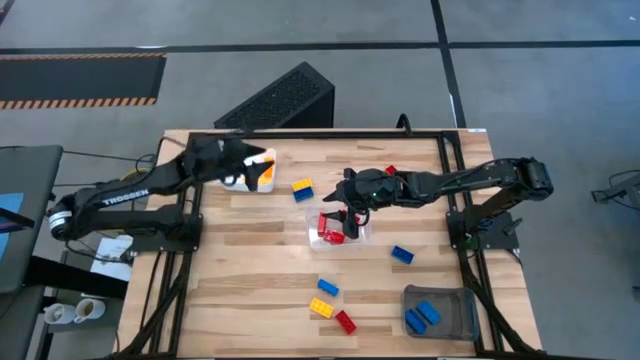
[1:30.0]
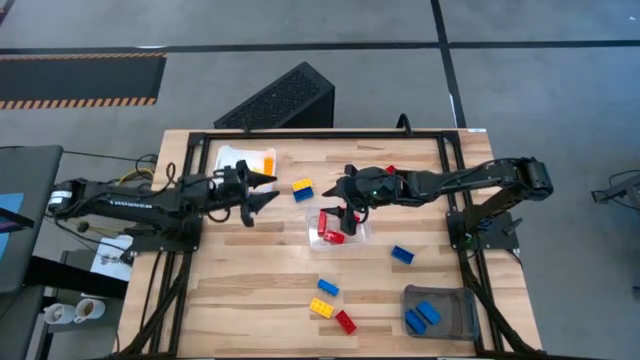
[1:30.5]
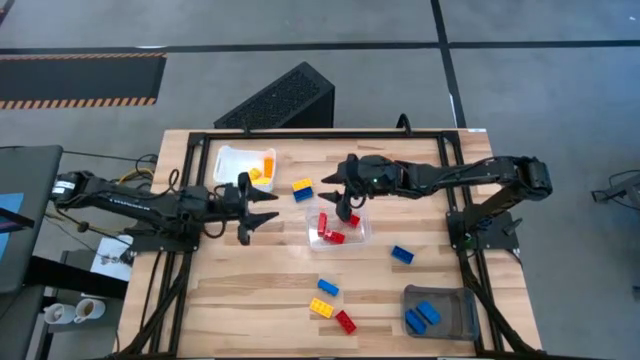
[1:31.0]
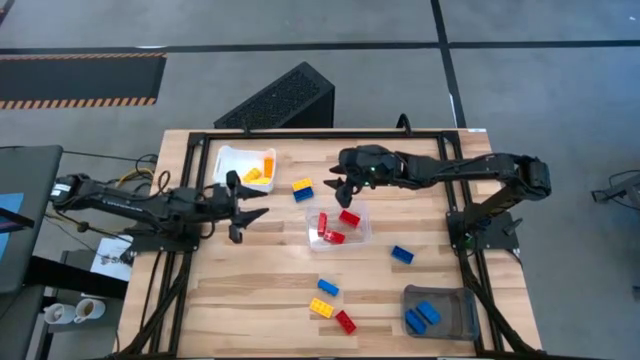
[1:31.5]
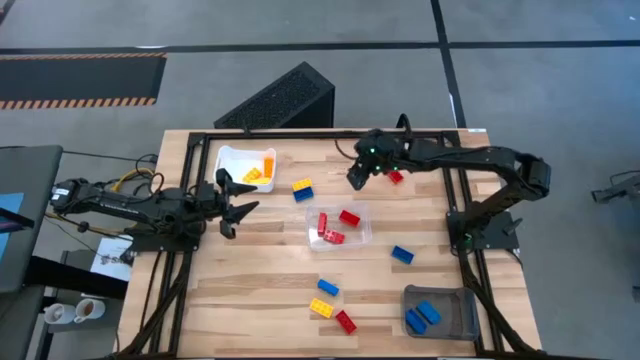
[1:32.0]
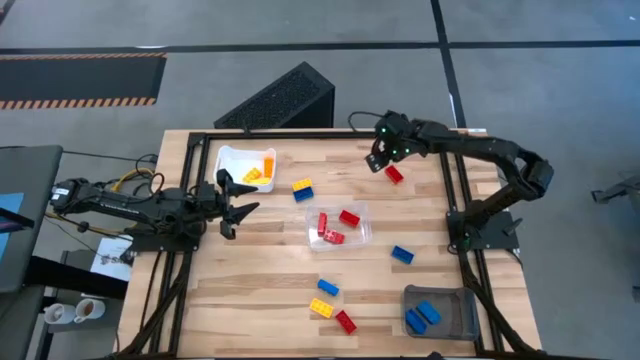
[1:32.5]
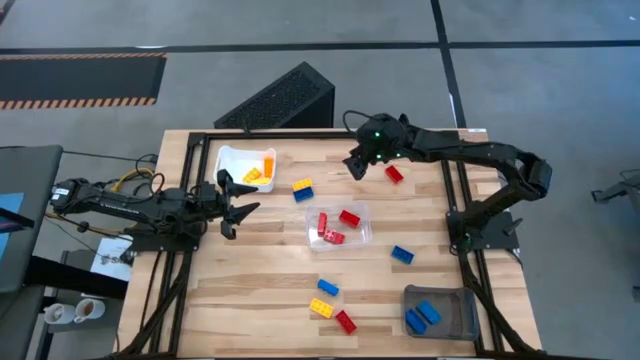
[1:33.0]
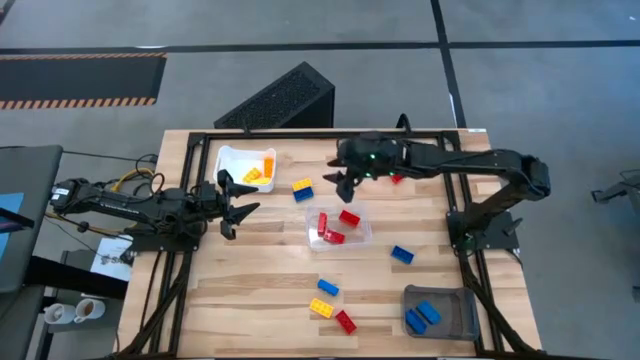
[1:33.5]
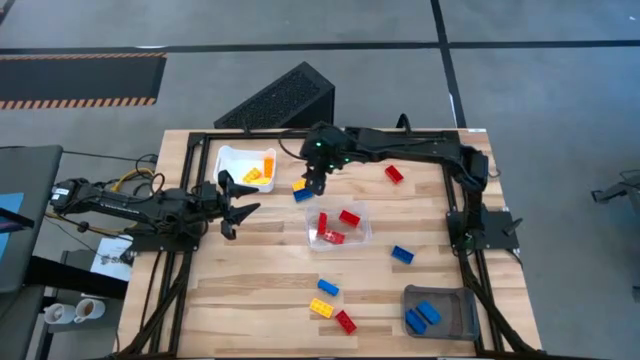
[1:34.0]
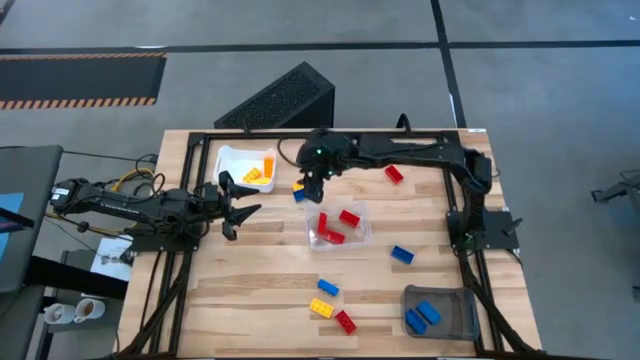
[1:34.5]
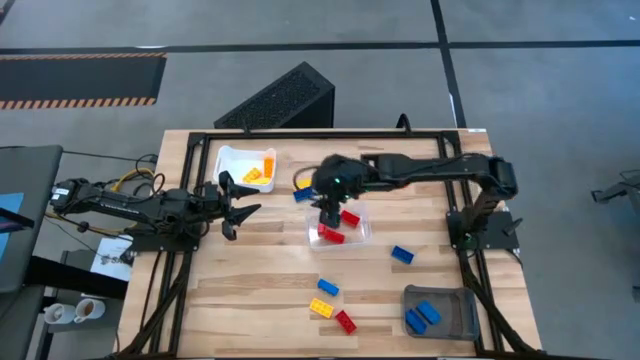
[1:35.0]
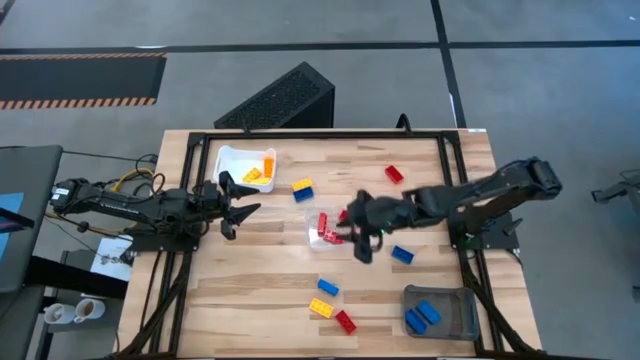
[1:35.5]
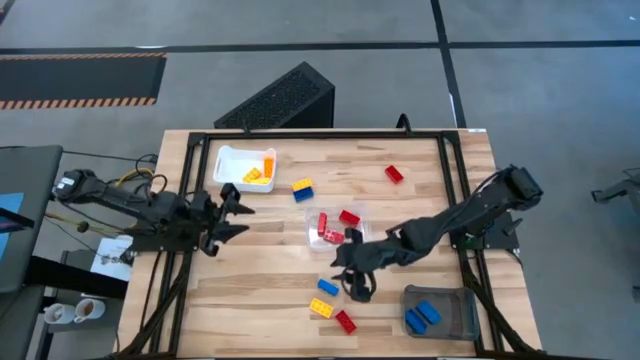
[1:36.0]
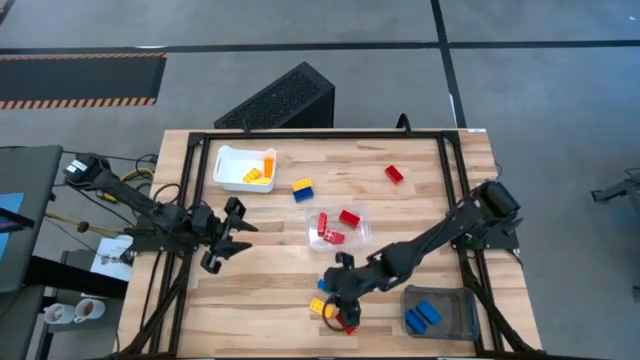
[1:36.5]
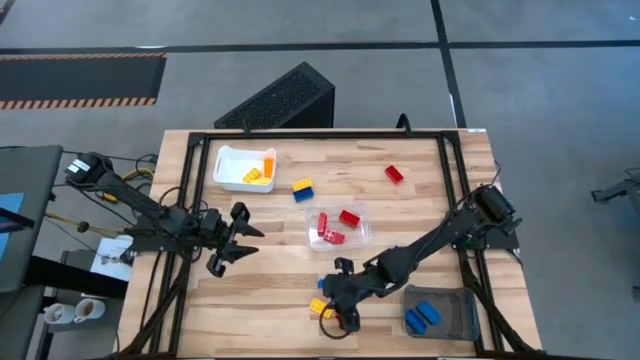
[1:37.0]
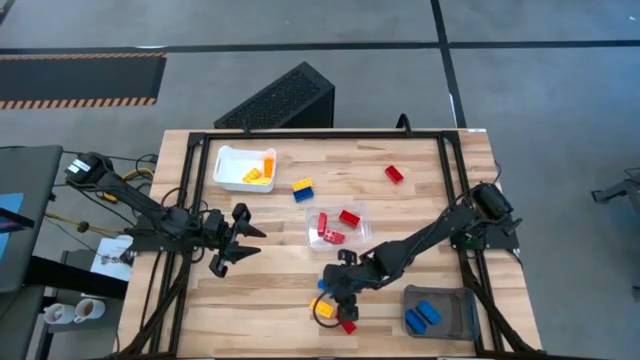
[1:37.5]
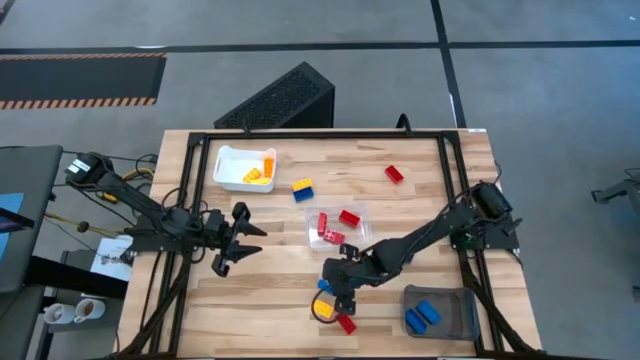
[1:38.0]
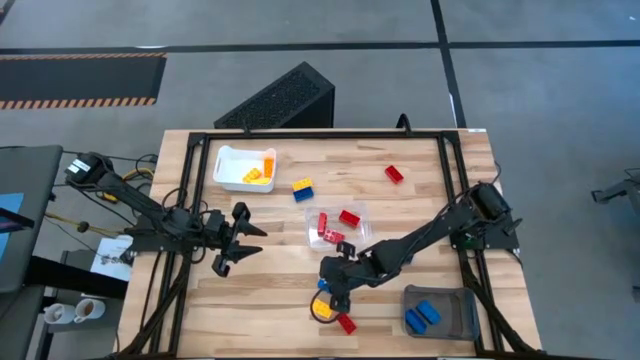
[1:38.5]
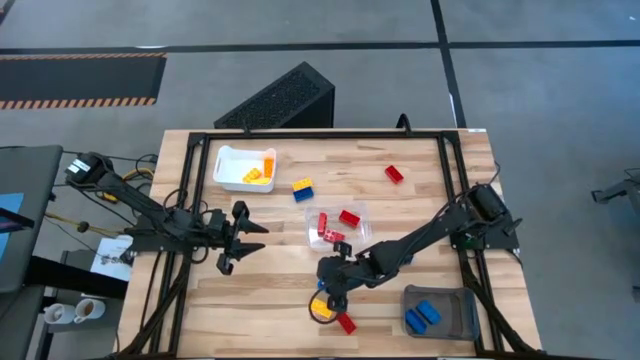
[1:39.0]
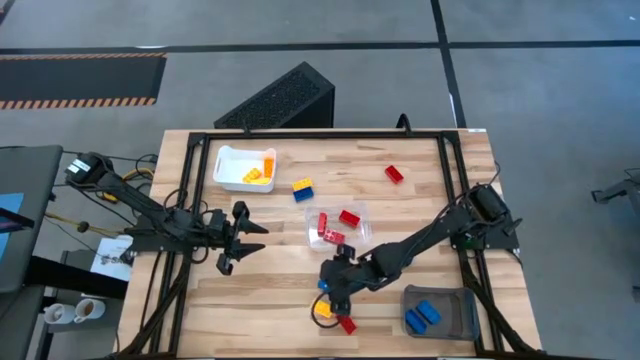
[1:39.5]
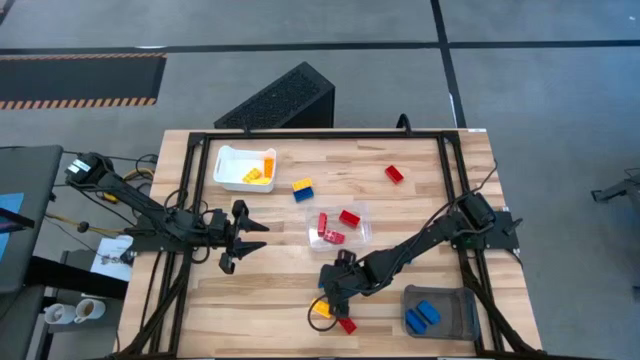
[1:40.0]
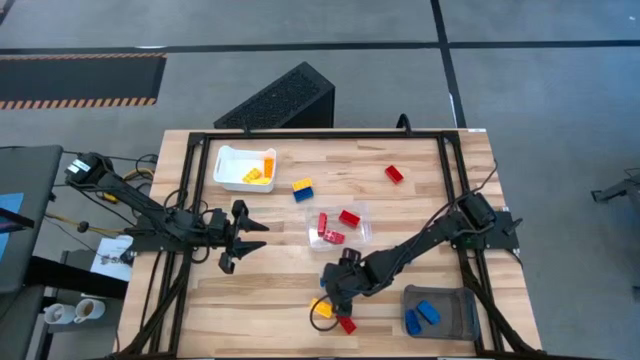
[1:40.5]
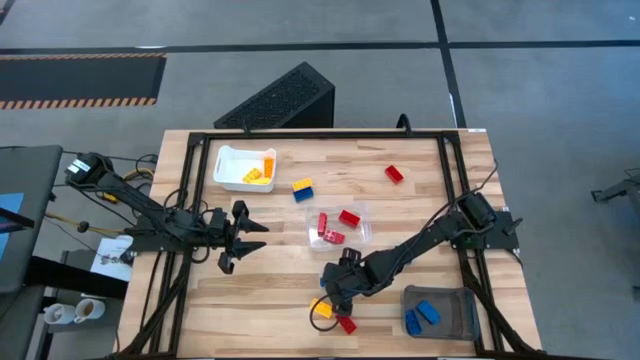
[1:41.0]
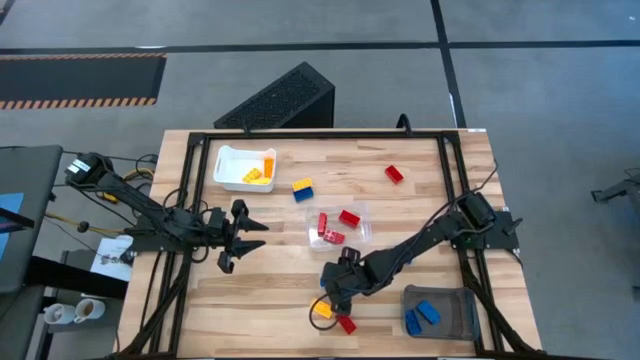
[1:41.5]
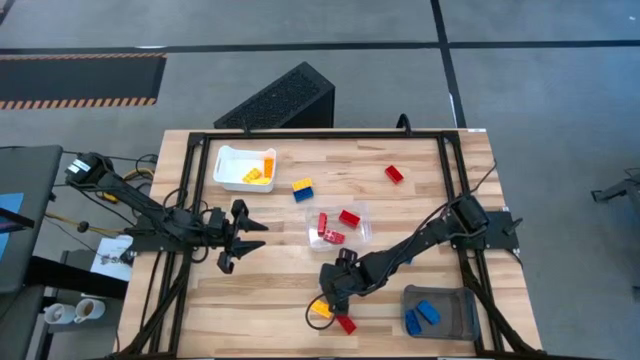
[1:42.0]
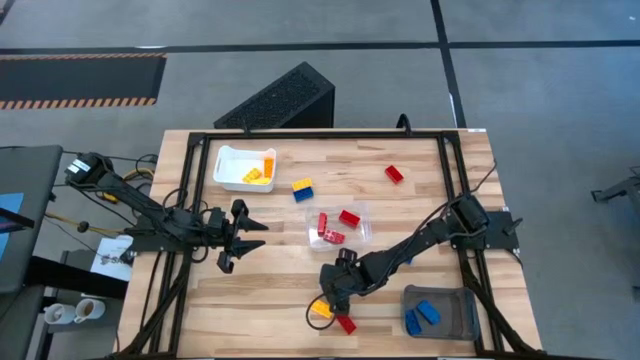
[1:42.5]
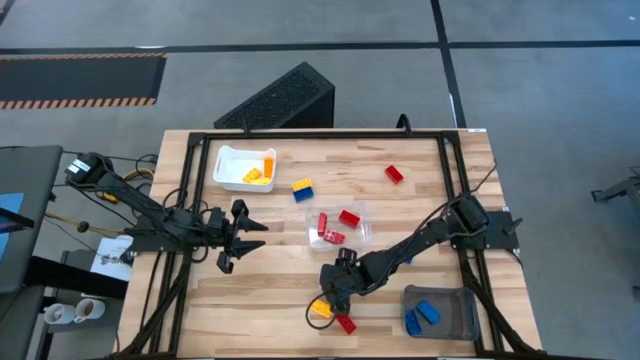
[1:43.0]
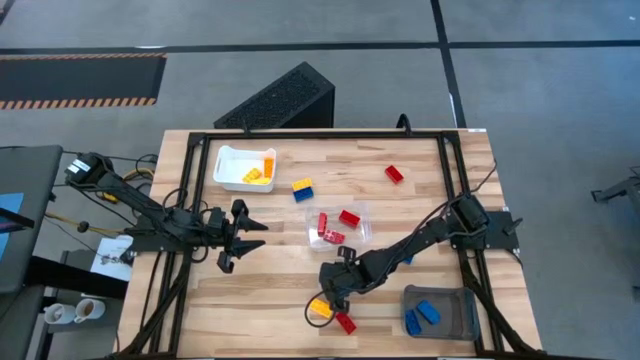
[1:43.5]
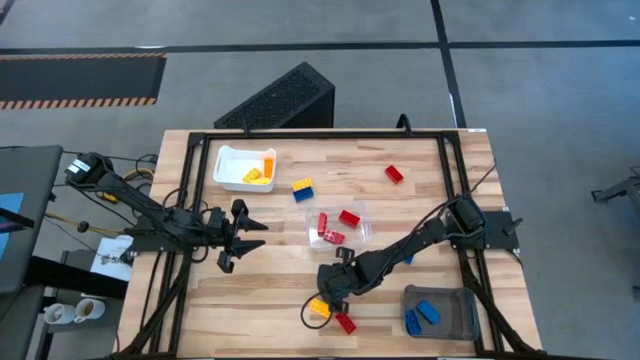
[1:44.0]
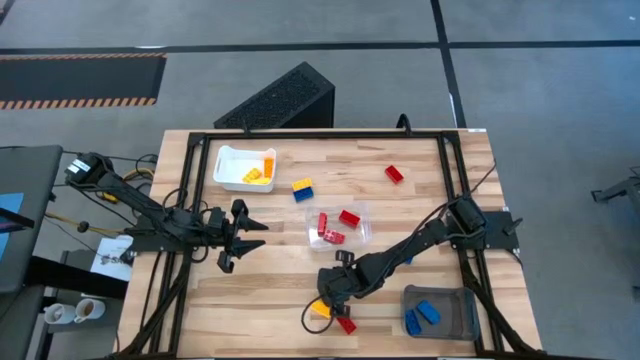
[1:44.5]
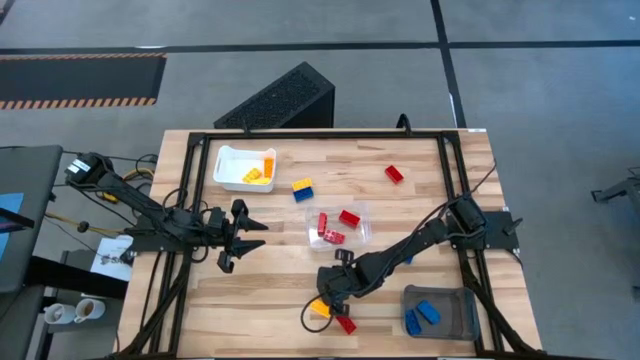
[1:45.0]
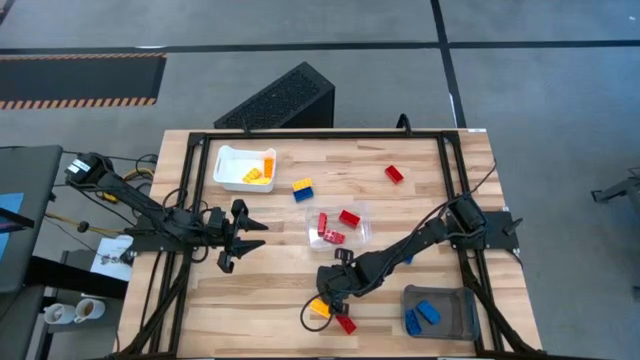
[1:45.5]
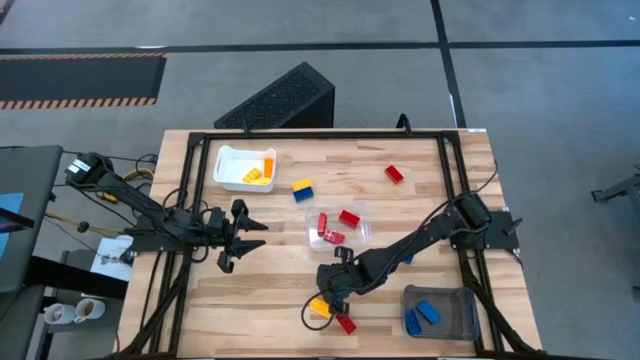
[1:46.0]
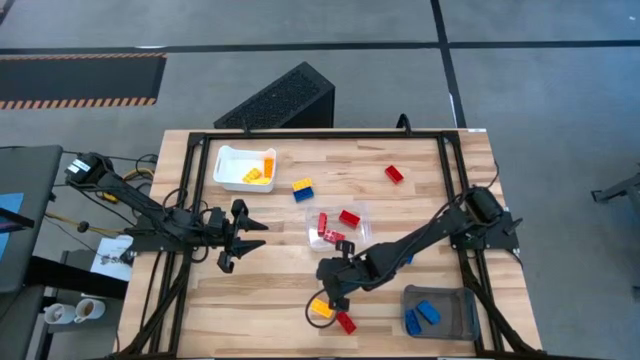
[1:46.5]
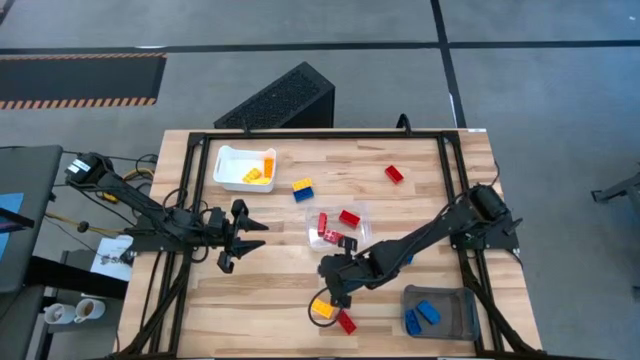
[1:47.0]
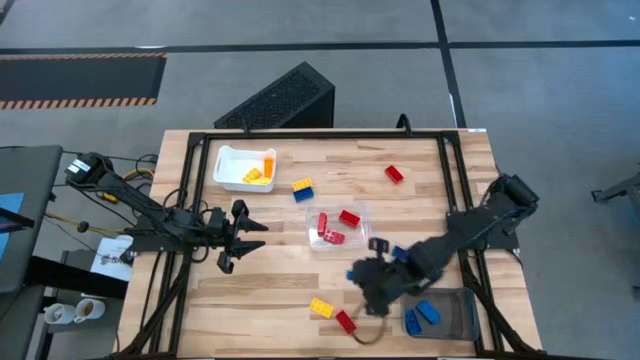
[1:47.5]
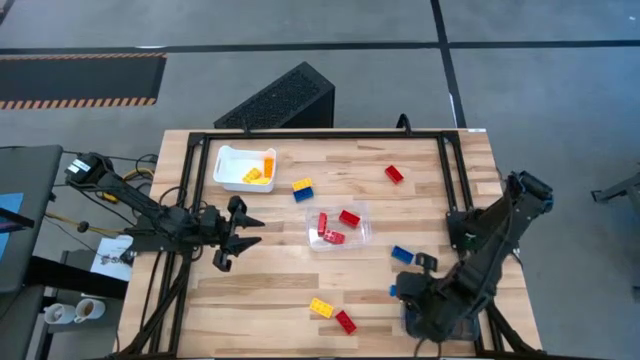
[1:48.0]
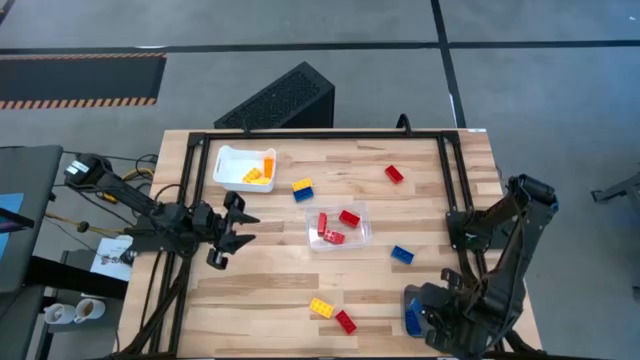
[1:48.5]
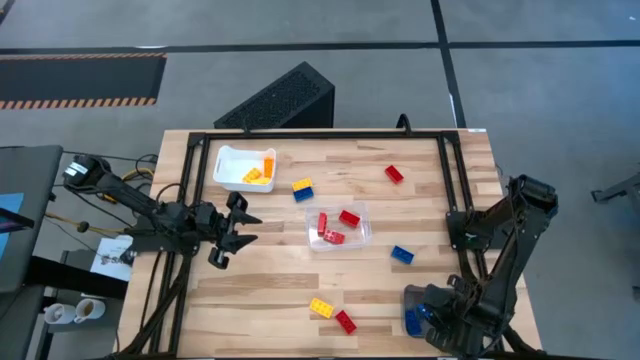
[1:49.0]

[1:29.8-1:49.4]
Task: Sort & place blocks by color
Put the blue game piece into the black bin

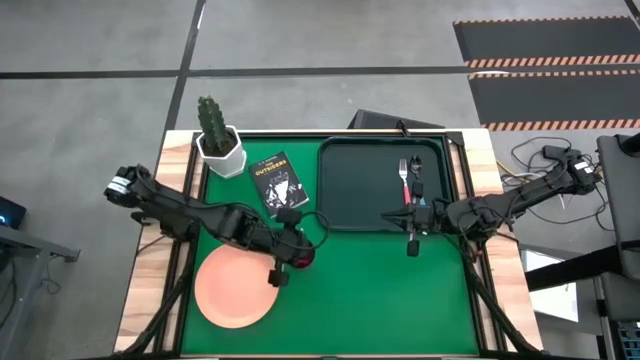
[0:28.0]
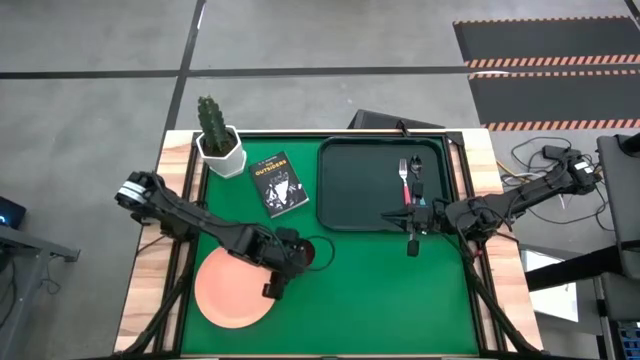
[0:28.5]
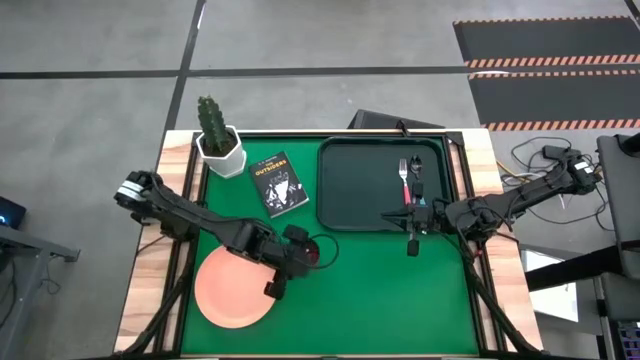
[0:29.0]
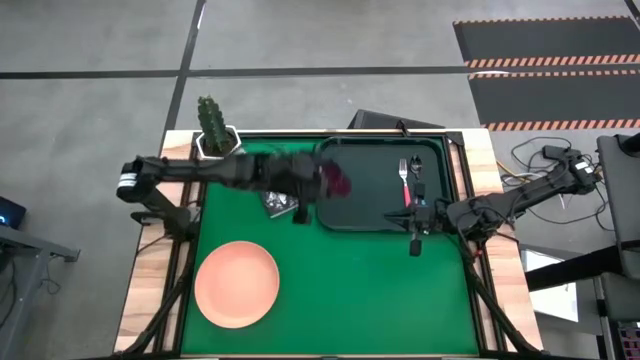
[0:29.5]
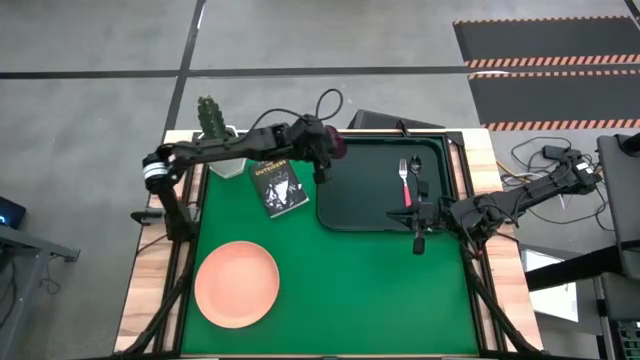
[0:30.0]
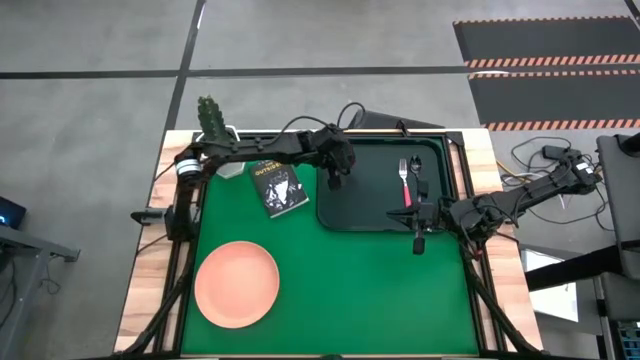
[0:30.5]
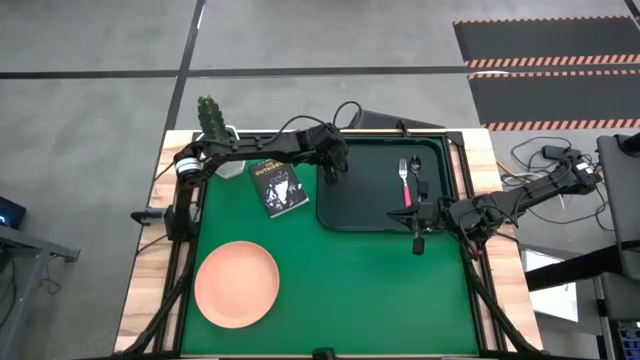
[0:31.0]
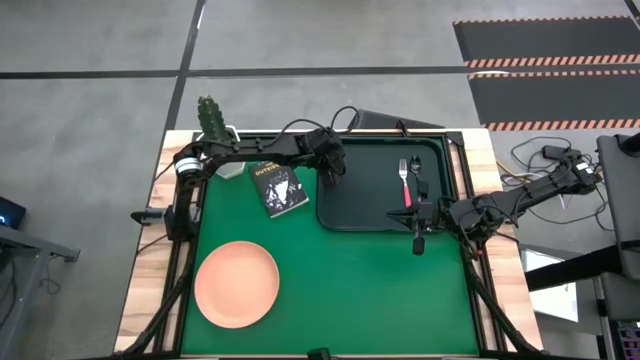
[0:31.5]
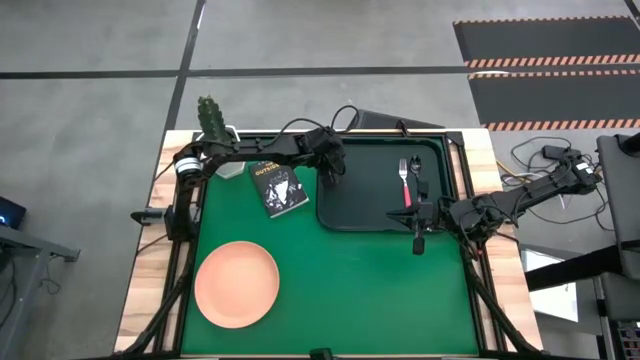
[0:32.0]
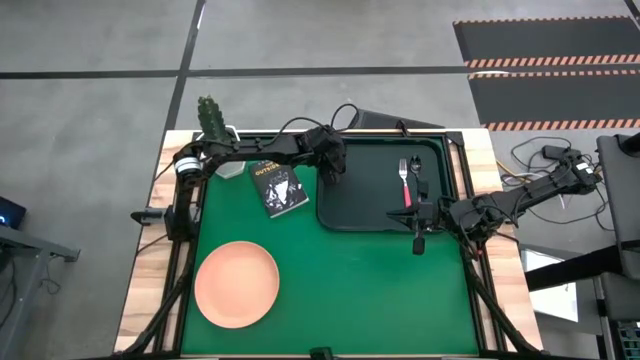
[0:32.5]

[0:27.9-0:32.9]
Task: Pick and place plate/cup/fork/spoon on tray
Put the red glass on the black serving tray
